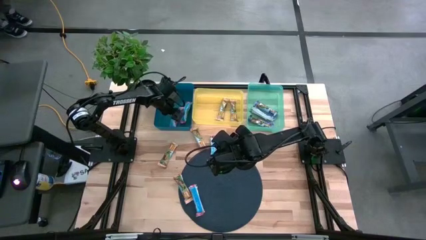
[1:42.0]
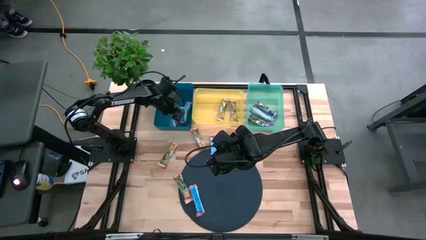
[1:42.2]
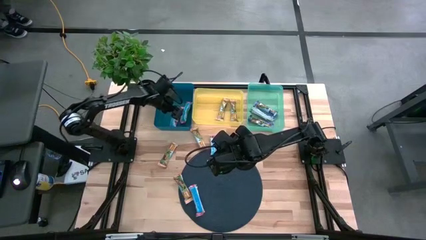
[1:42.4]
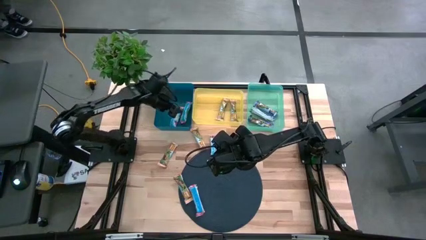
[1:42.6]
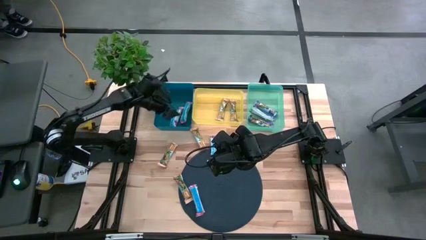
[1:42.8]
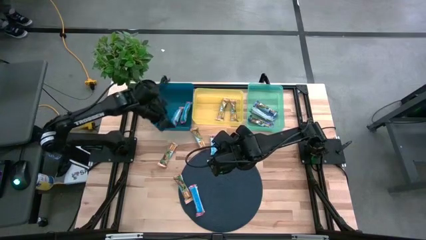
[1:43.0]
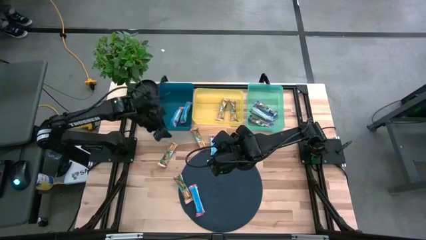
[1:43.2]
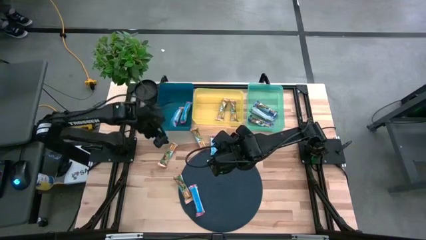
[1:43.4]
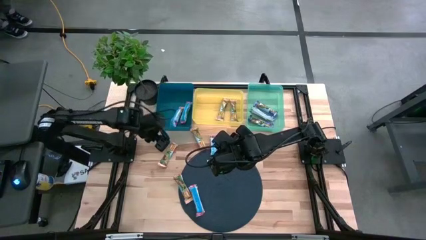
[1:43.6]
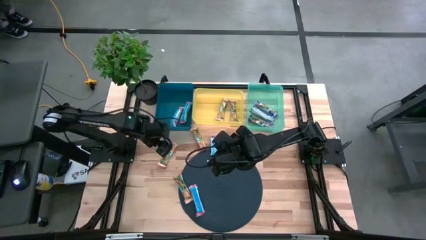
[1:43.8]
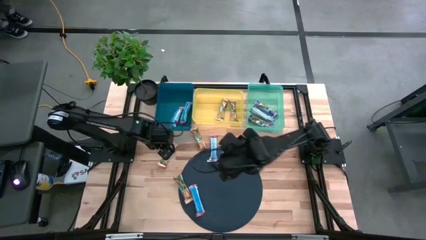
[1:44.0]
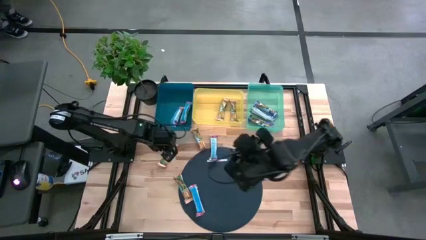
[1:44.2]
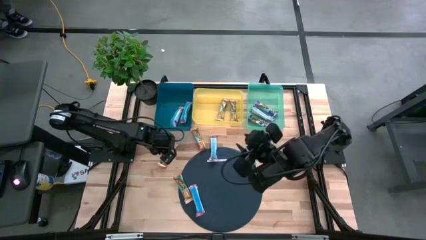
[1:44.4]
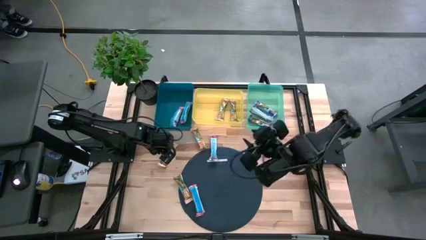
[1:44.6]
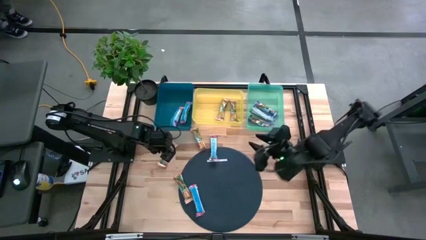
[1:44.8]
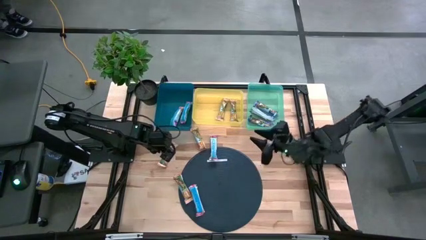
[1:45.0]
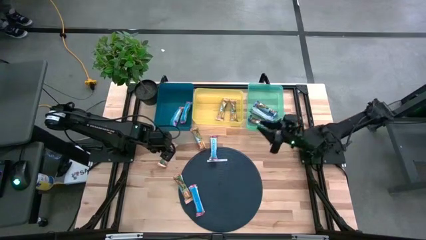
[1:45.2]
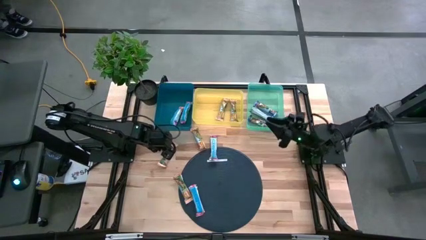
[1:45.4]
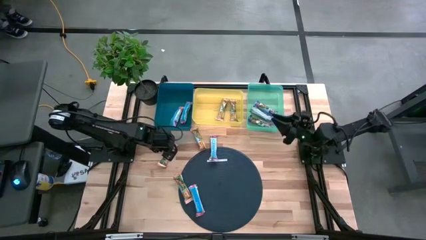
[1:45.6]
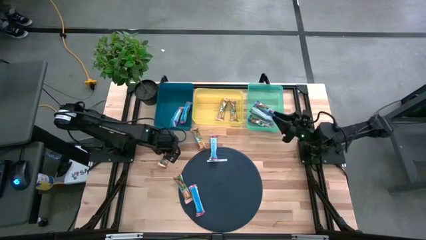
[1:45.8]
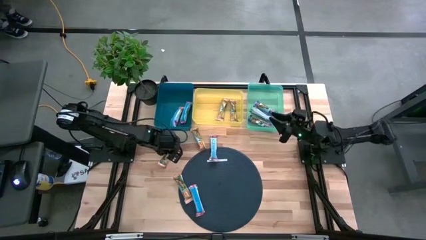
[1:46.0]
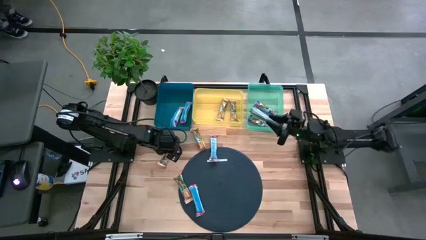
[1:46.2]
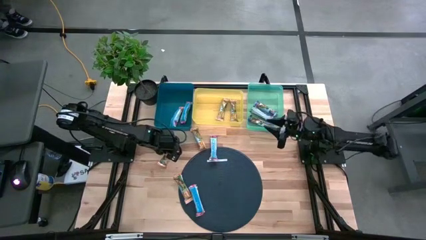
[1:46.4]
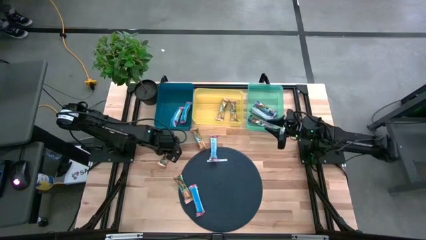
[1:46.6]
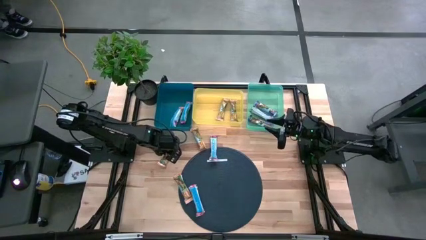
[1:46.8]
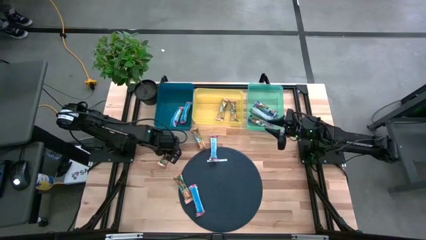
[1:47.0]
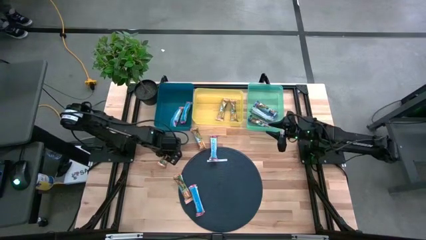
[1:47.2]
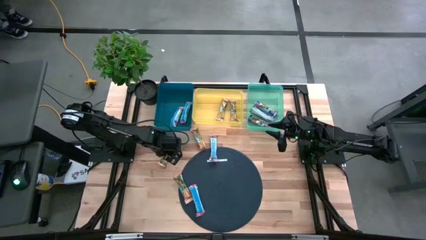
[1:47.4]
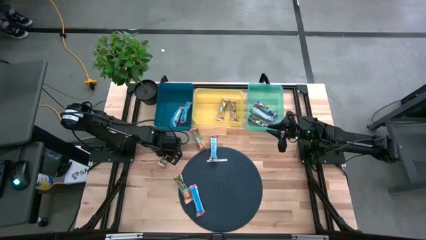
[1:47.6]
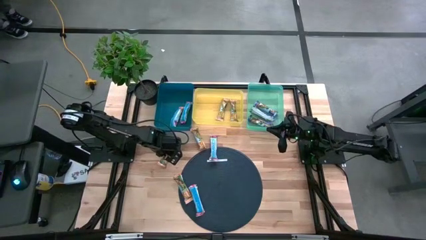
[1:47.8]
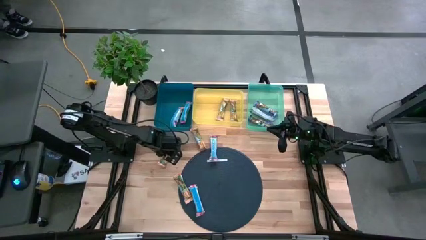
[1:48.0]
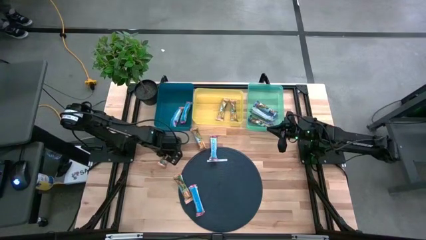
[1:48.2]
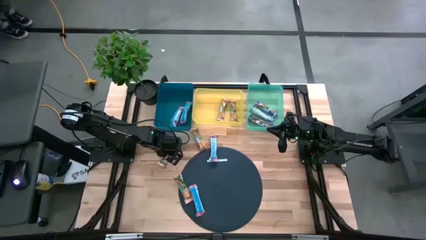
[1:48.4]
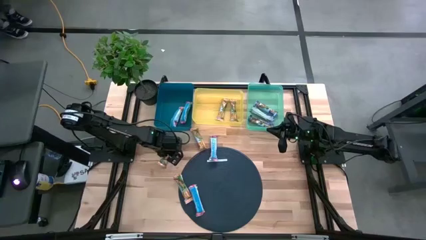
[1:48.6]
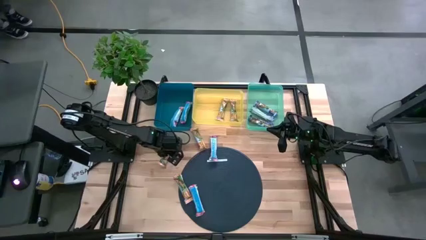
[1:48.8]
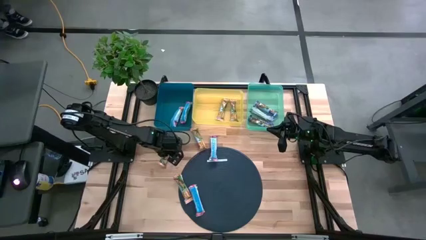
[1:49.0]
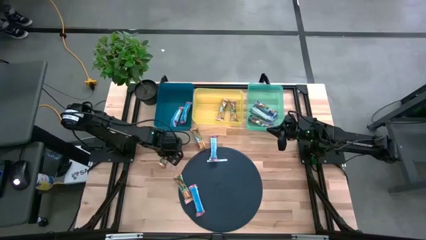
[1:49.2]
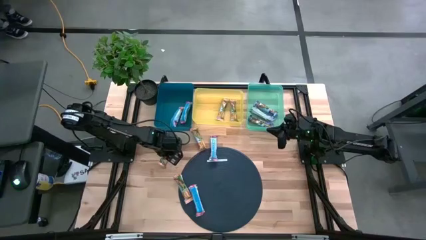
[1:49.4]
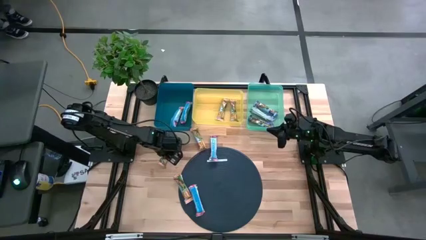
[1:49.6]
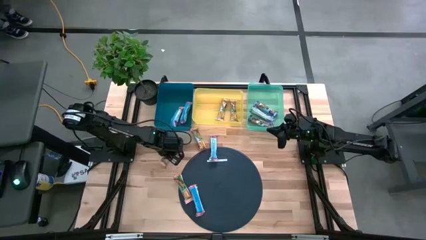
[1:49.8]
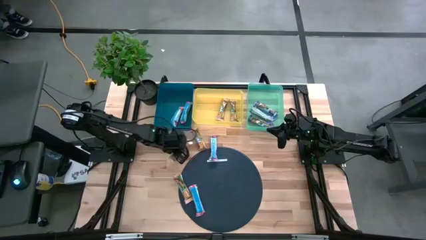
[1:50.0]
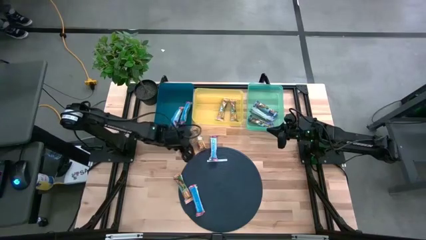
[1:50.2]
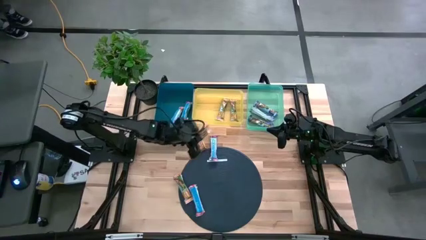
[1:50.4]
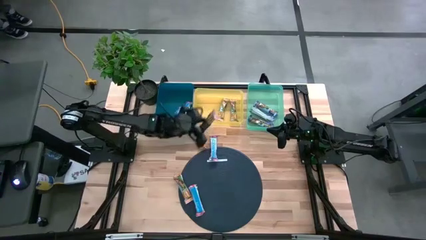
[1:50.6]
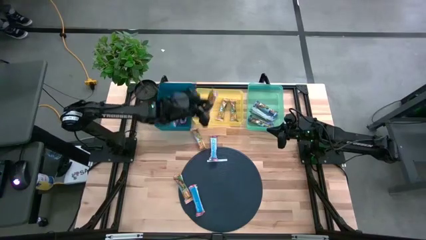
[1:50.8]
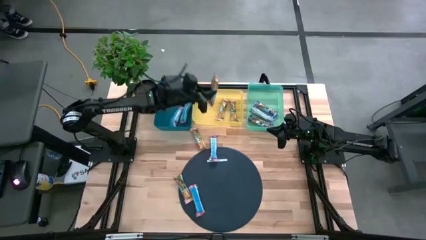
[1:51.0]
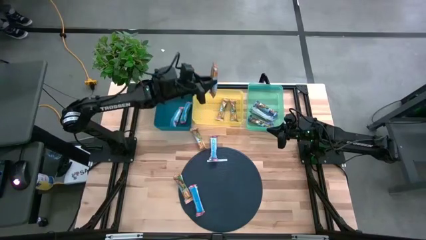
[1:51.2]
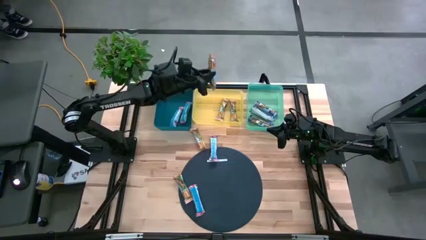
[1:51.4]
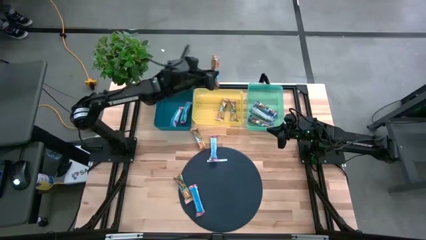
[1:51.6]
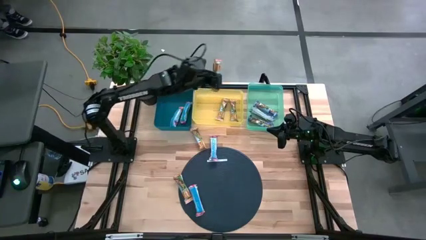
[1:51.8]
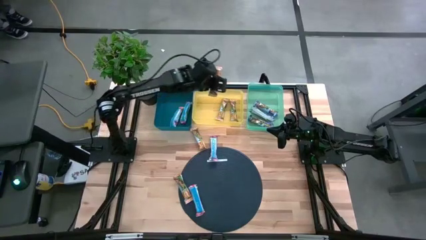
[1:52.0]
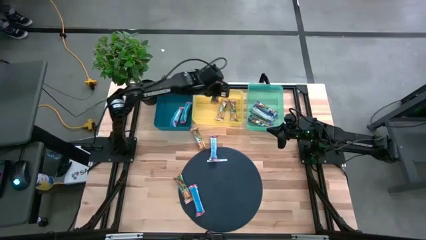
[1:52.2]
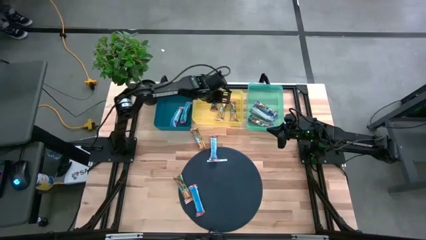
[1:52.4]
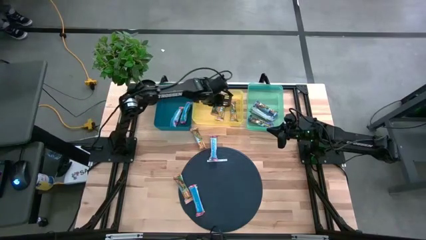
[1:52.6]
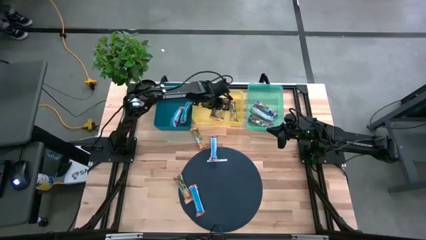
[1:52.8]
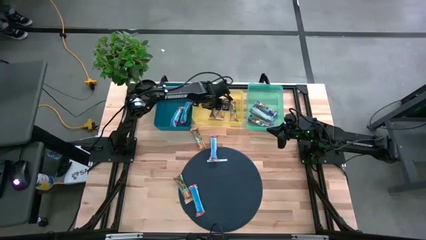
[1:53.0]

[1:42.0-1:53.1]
Task: Pick and place Granola Bars by type
Put the orange granola bar into the yellow bin

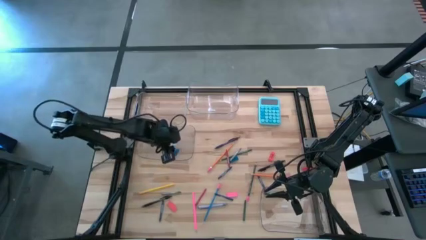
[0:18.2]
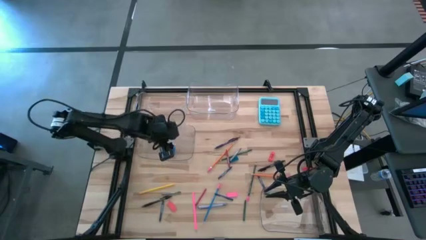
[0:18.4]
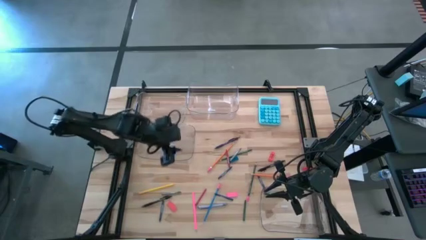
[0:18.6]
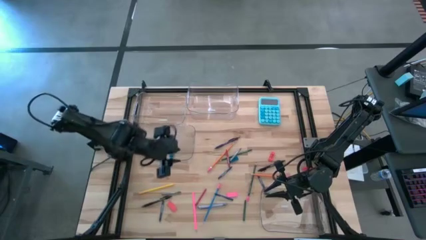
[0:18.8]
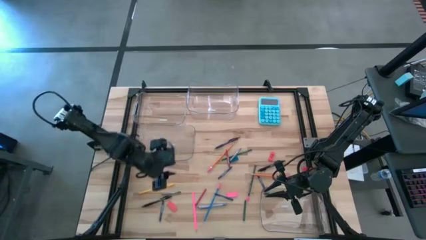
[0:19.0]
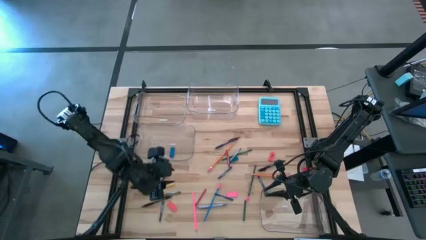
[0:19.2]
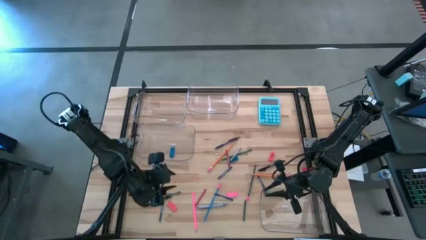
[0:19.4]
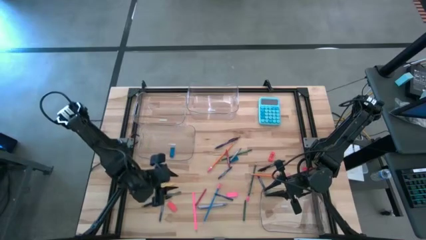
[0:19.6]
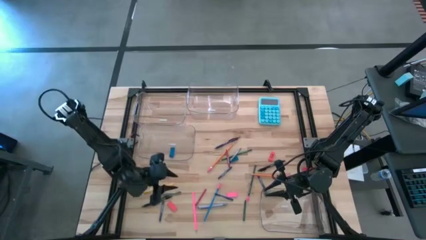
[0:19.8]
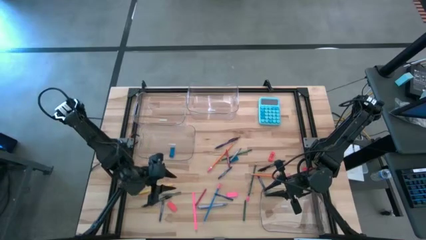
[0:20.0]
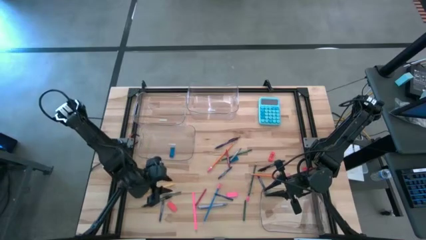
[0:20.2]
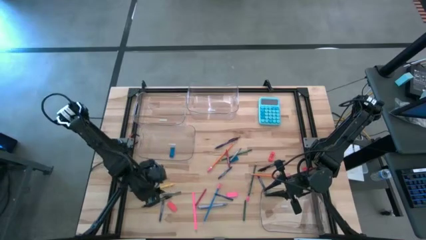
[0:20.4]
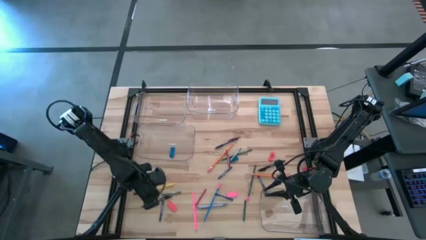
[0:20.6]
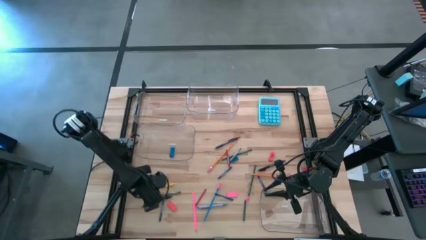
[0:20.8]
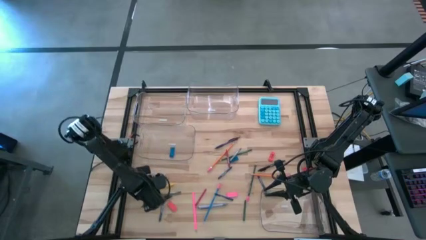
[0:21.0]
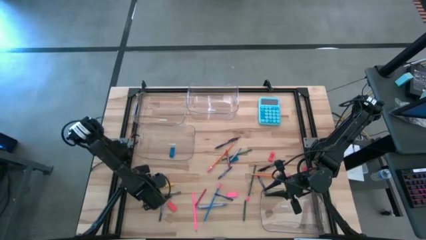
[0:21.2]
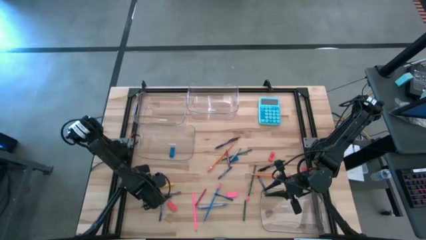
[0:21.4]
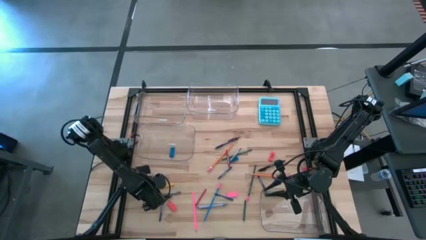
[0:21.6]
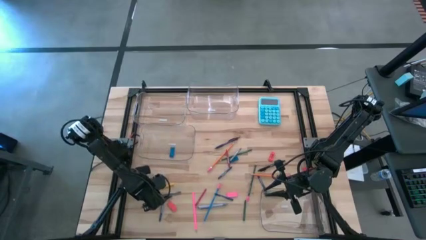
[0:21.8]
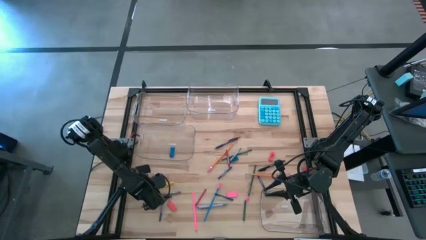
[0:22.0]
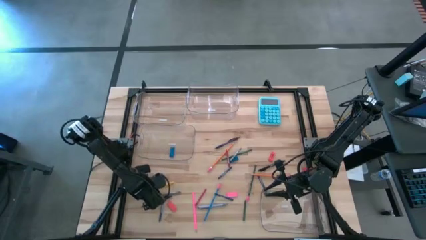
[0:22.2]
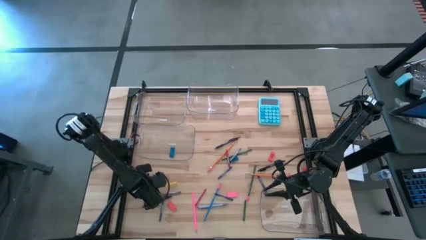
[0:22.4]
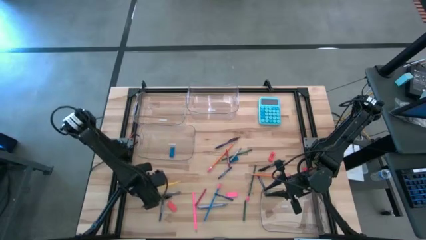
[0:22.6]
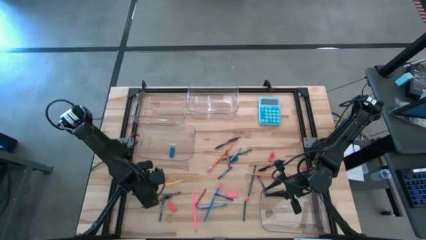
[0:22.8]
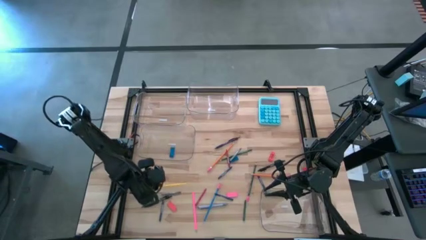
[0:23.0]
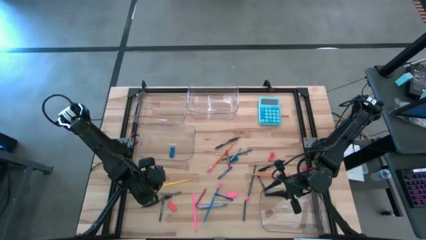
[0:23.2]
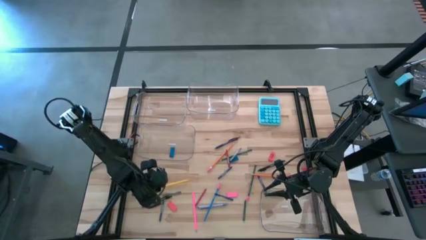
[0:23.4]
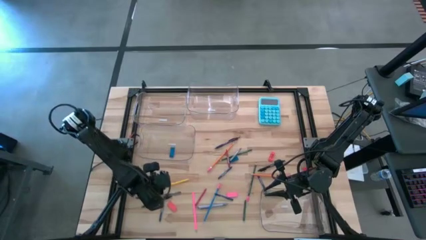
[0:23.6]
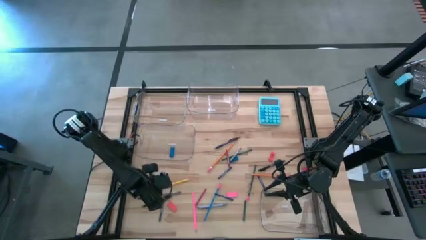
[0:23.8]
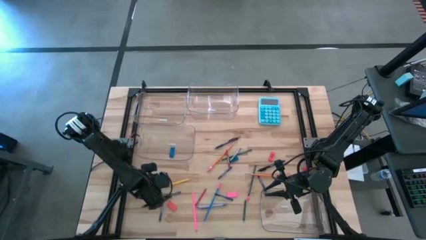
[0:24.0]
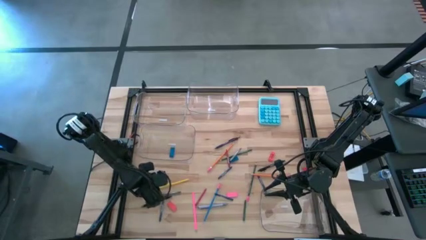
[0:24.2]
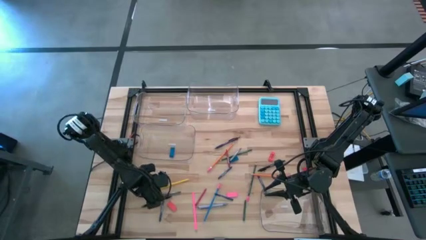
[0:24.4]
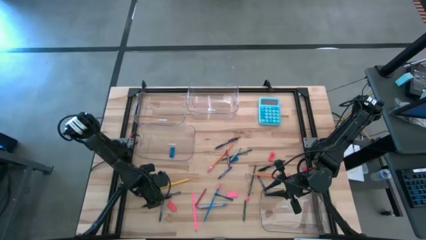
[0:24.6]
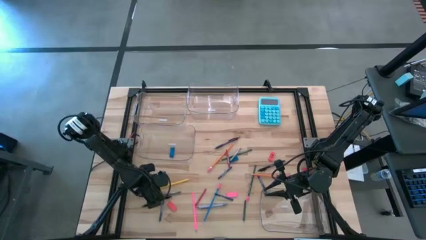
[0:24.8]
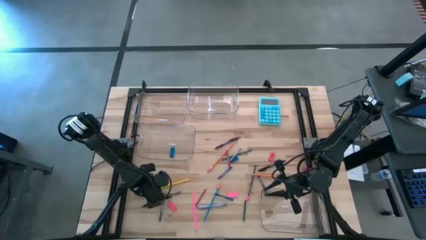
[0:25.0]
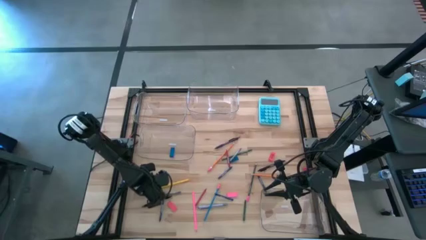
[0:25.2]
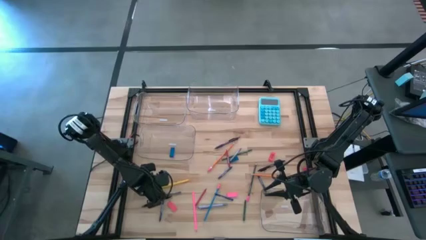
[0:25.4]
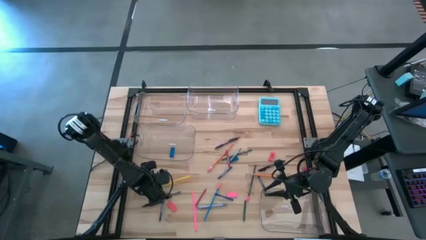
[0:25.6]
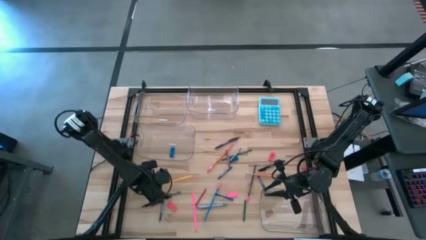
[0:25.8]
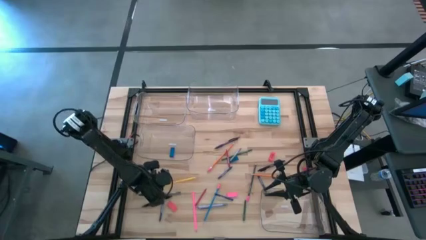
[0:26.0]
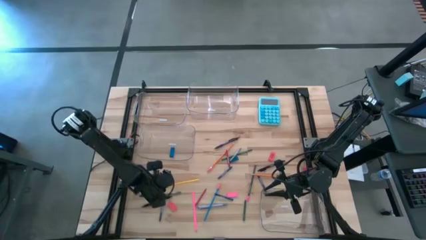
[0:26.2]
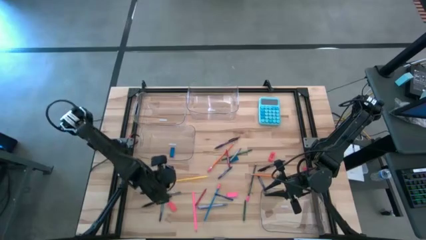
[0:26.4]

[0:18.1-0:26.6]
Task: Sort crayons/erasers/pens/pencils in bins
Put the yellow pencil into the top right transparent bin
